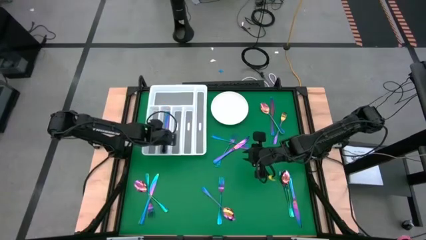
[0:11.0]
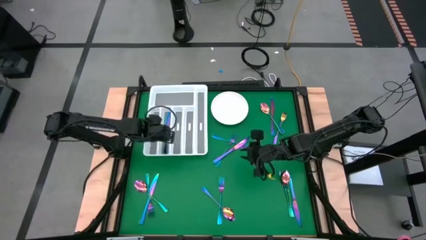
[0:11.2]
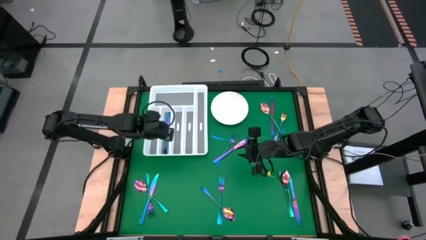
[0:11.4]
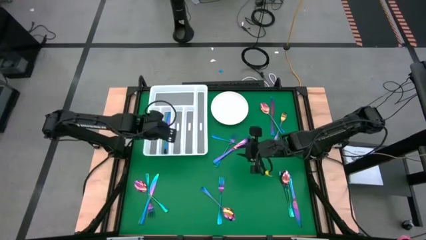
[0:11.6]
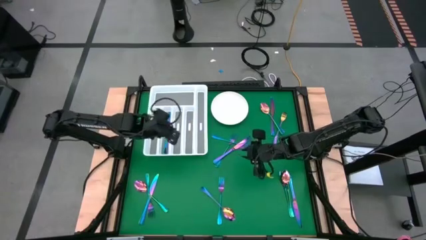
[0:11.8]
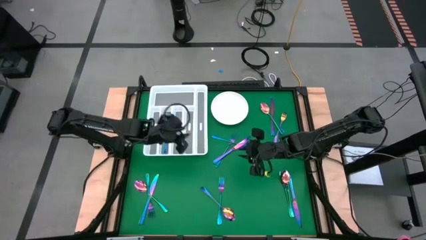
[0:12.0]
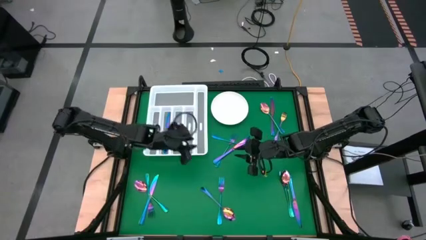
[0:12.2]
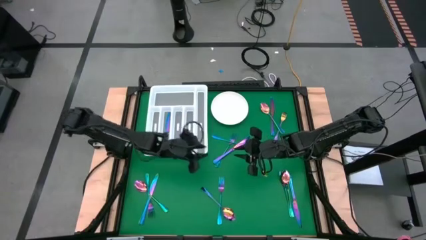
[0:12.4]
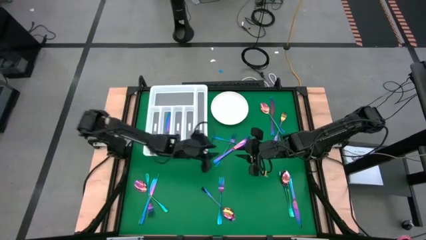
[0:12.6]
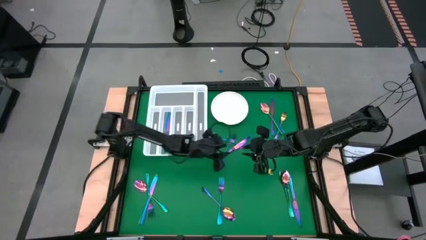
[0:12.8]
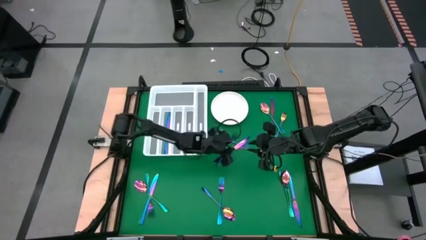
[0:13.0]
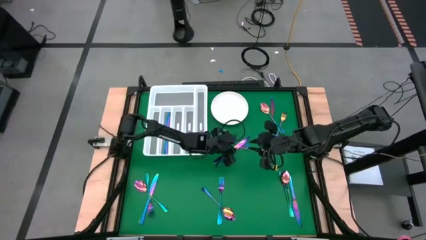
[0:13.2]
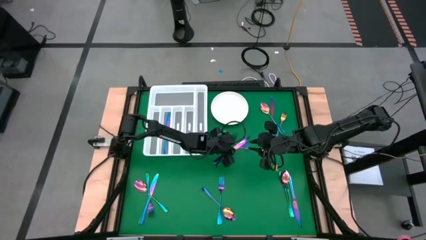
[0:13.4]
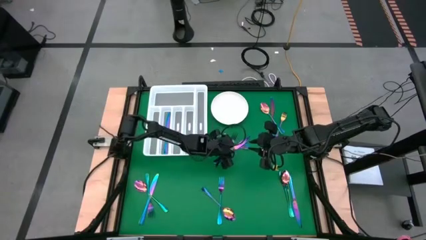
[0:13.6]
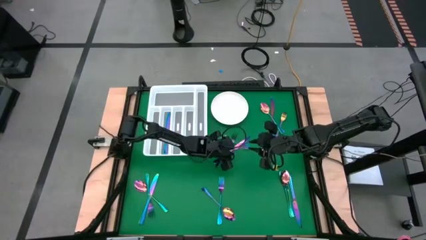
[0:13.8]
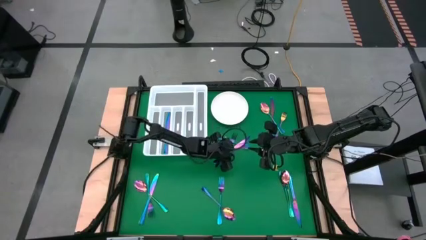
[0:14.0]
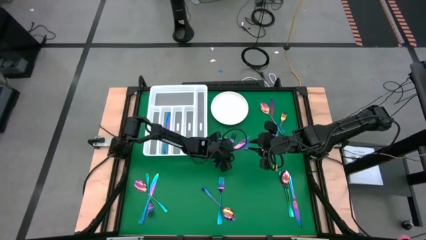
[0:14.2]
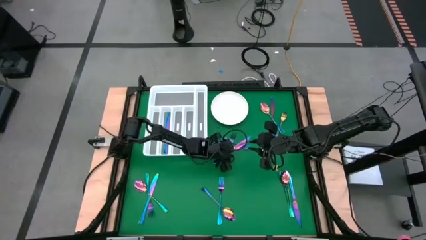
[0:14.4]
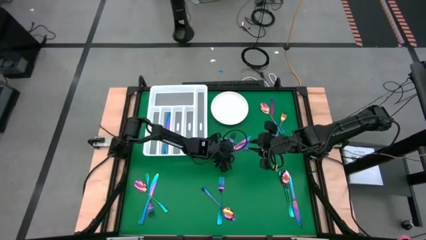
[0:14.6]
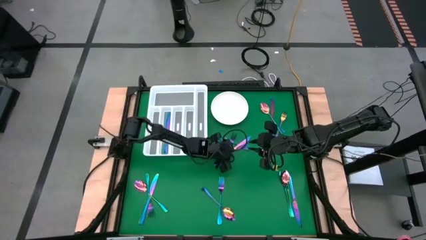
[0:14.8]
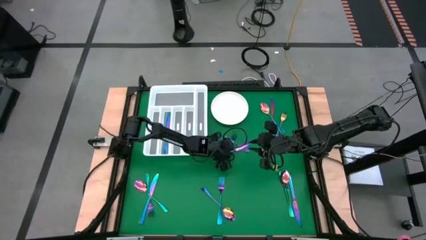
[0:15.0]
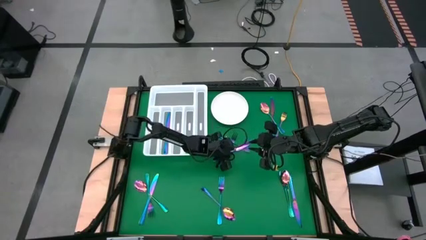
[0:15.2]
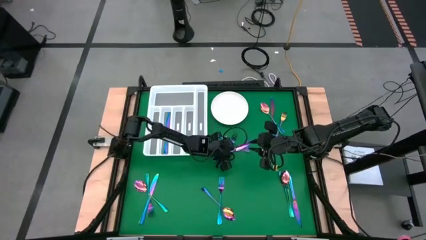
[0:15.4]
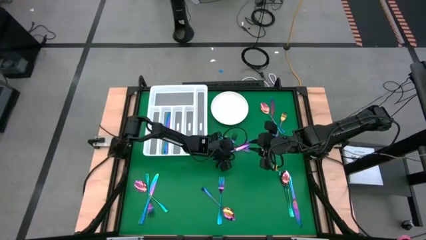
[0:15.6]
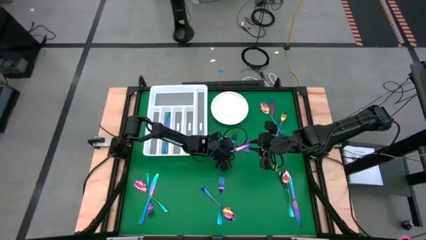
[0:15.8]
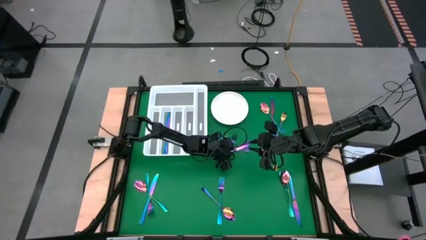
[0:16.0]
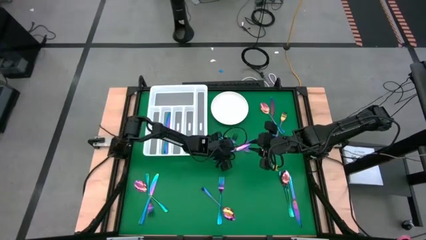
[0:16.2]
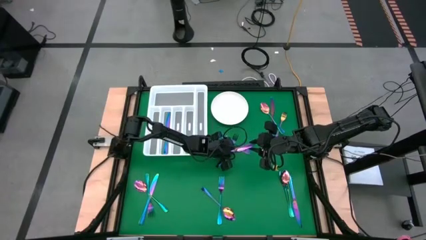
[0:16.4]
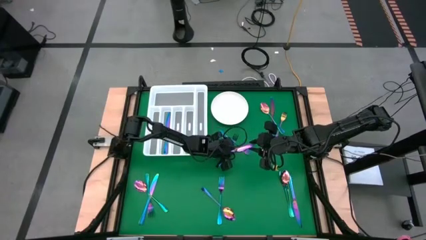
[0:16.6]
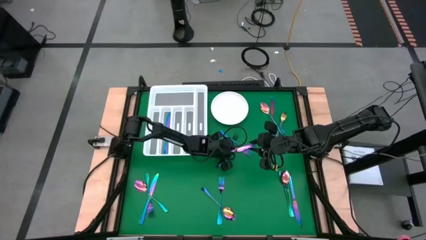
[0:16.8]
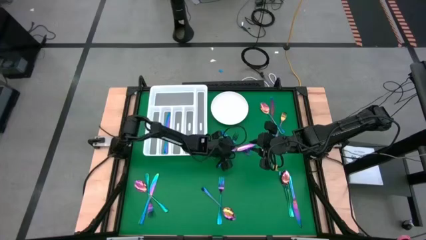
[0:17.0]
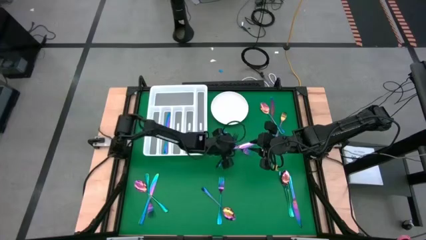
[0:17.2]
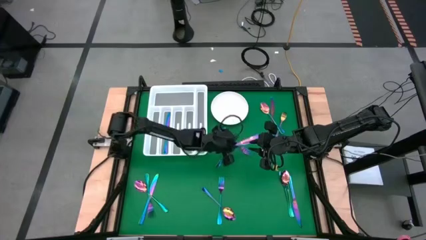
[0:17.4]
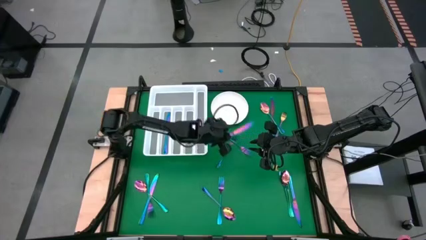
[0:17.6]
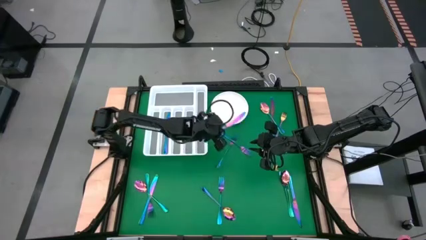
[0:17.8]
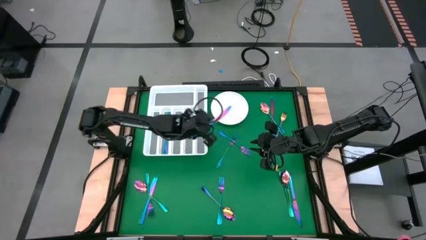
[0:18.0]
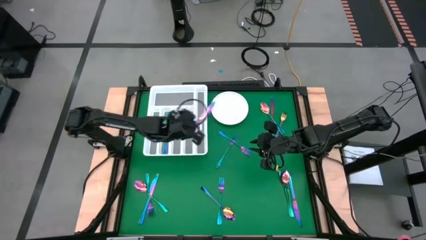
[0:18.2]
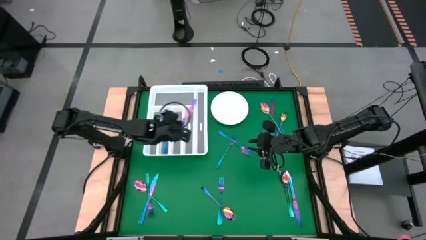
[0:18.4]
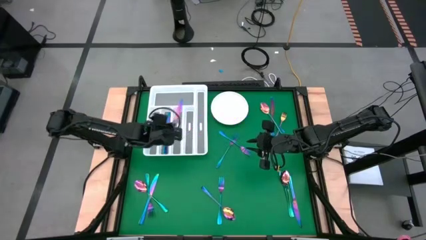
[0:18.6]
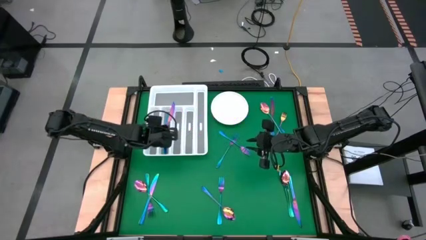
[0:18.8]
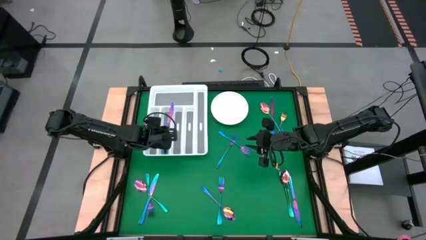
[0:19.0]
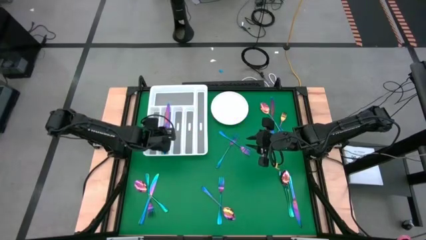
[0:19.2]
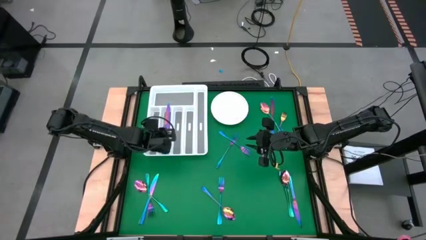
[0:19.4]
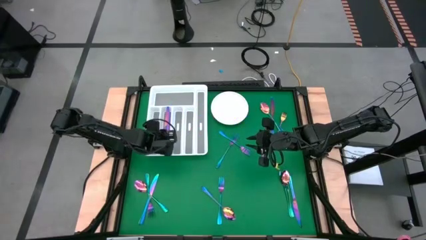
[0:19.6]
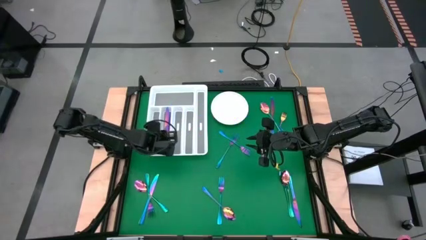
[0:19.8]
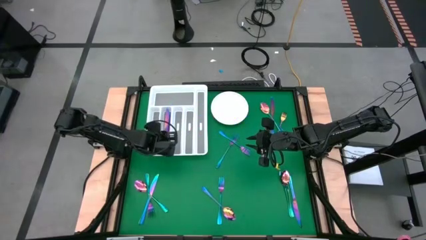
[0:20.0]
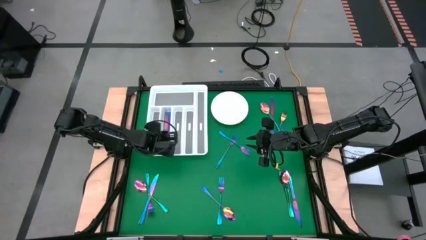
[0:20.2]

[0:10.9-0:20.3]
Task: Sort silverware
Put the blue knife into the silverware tray
